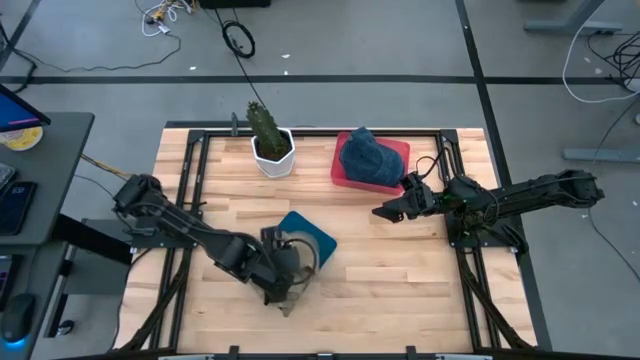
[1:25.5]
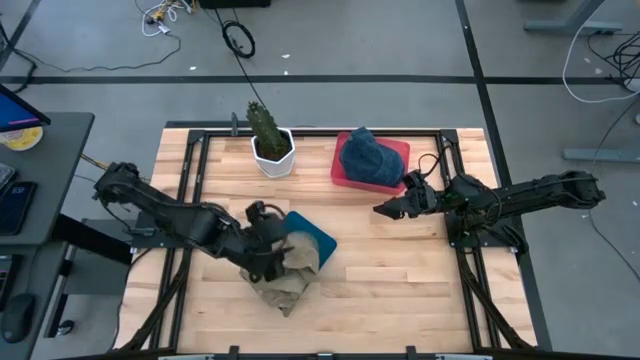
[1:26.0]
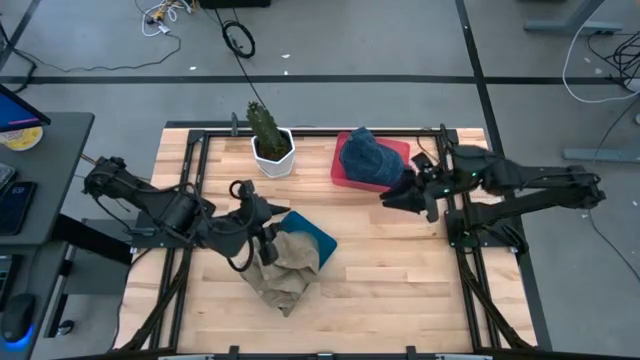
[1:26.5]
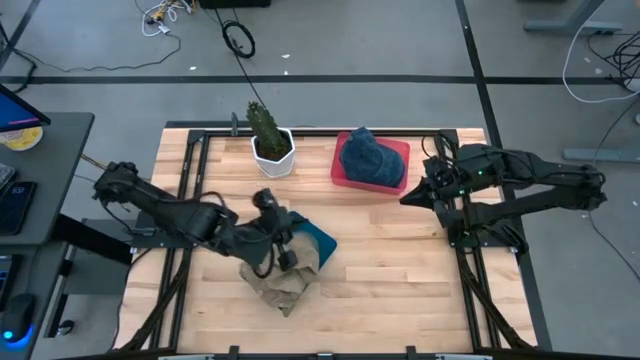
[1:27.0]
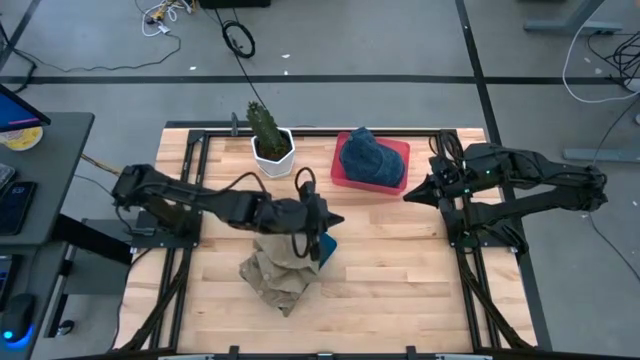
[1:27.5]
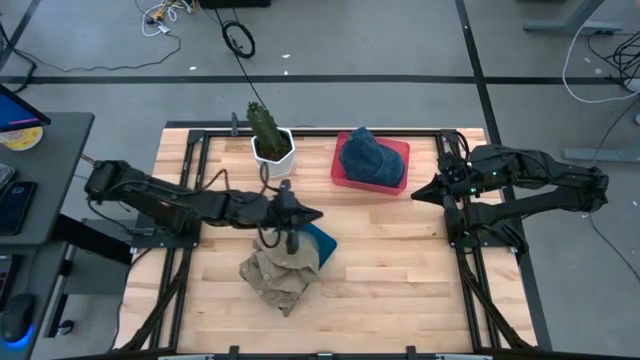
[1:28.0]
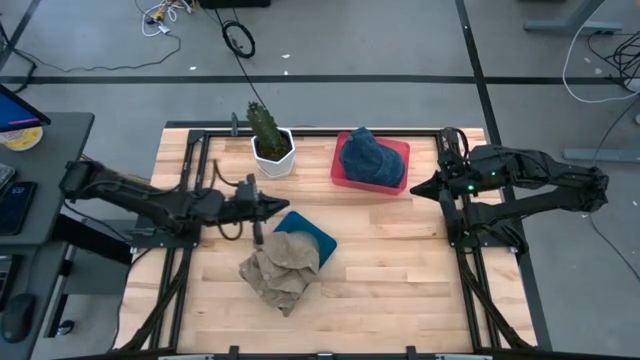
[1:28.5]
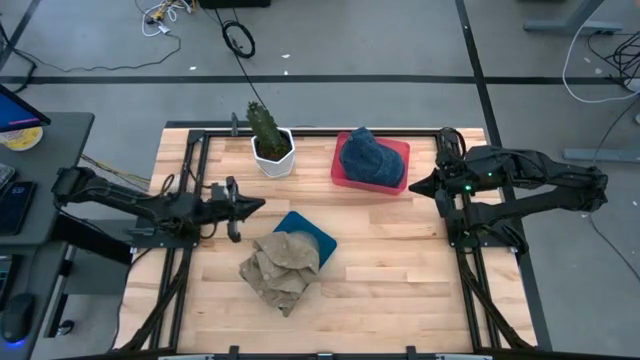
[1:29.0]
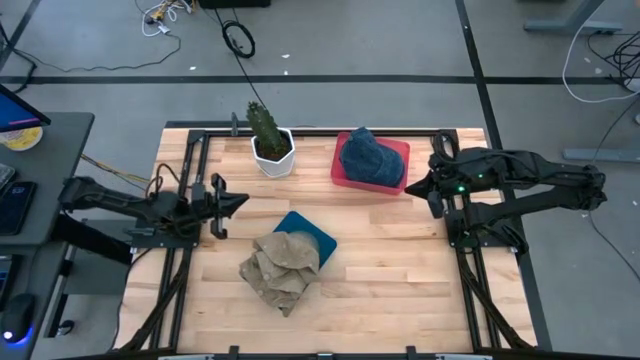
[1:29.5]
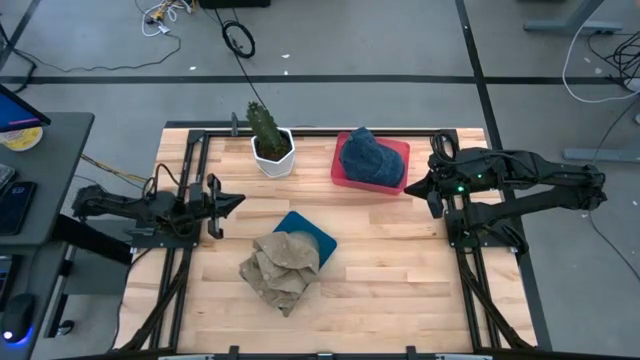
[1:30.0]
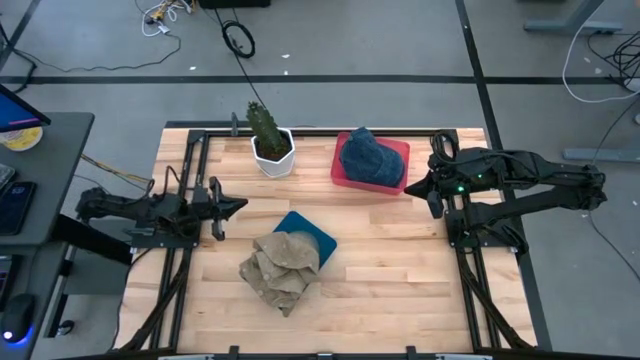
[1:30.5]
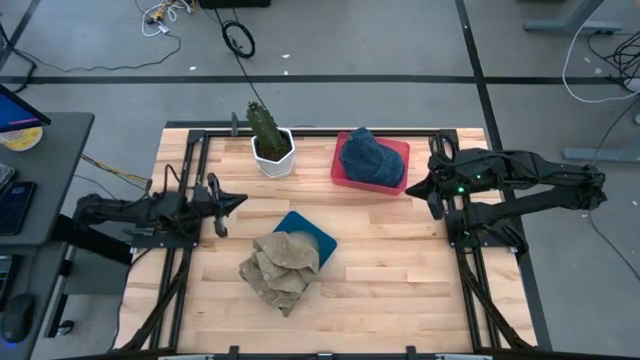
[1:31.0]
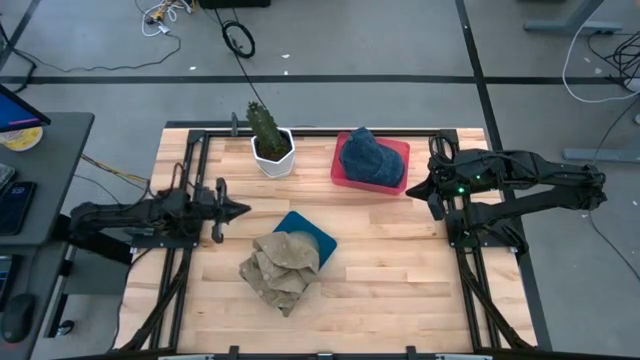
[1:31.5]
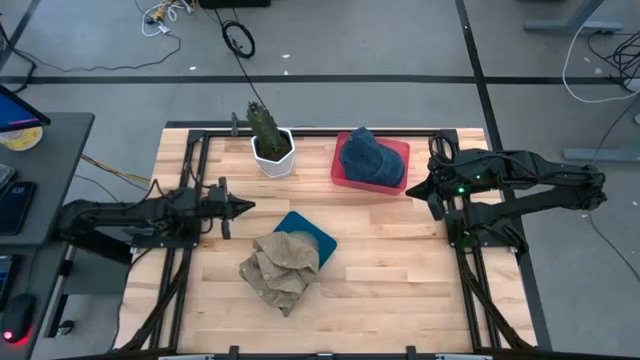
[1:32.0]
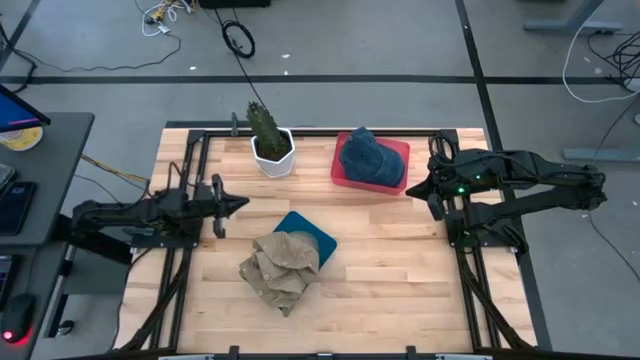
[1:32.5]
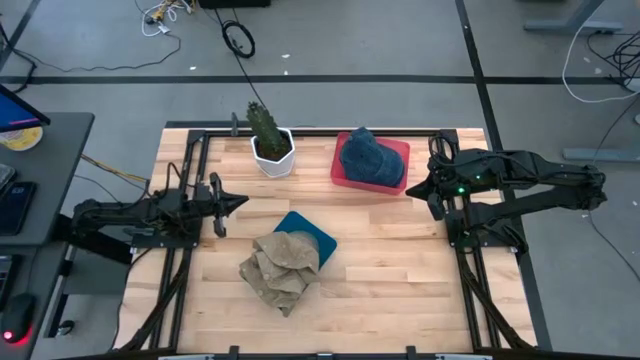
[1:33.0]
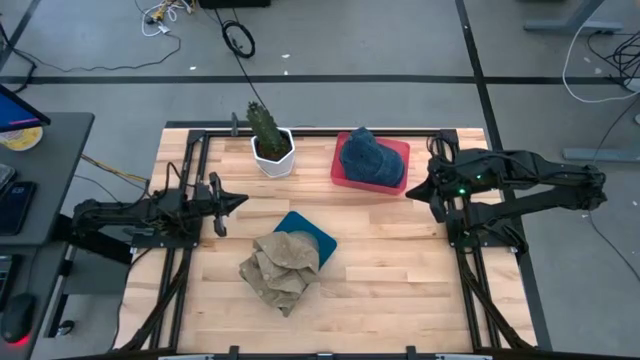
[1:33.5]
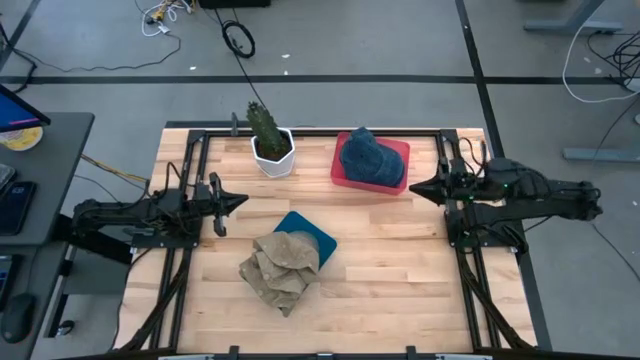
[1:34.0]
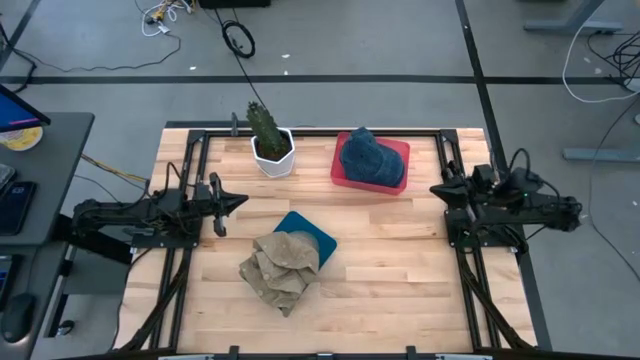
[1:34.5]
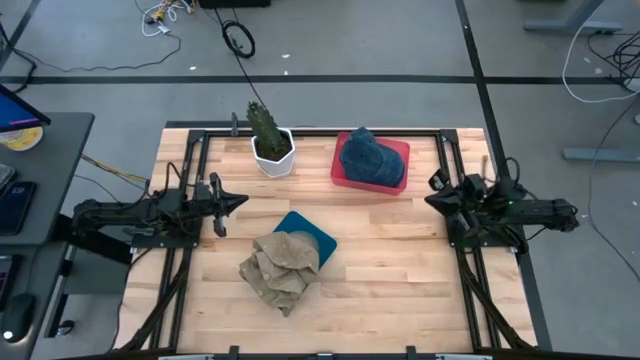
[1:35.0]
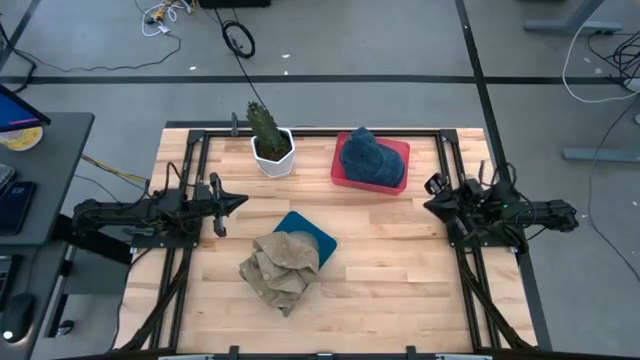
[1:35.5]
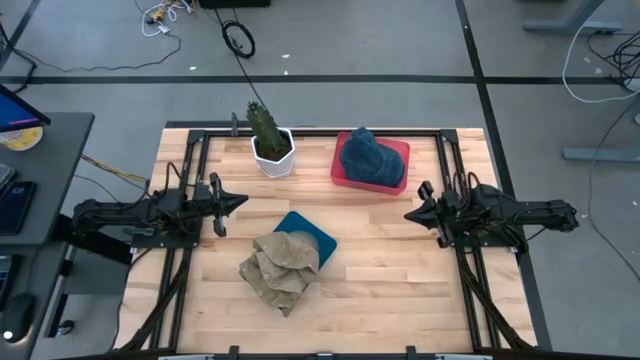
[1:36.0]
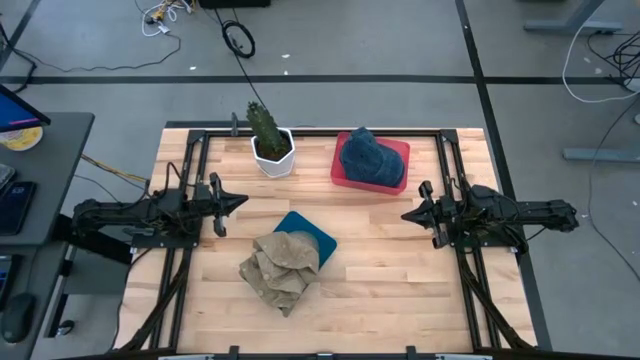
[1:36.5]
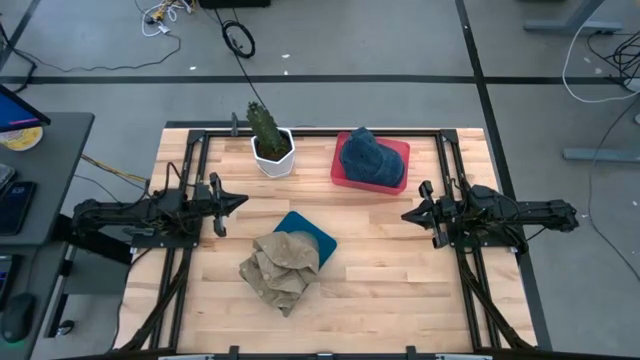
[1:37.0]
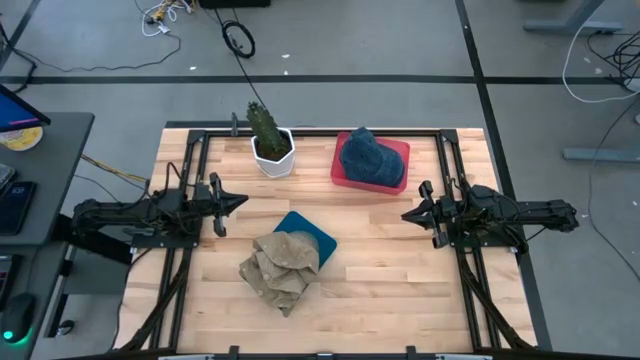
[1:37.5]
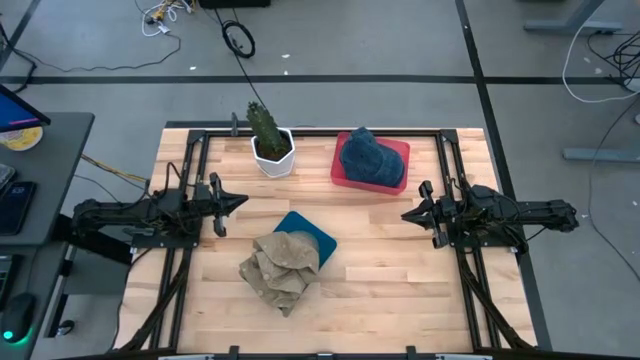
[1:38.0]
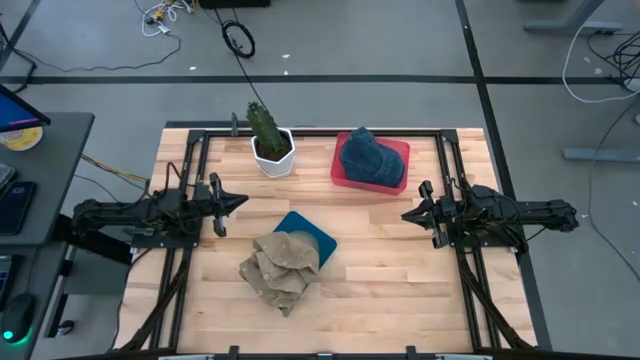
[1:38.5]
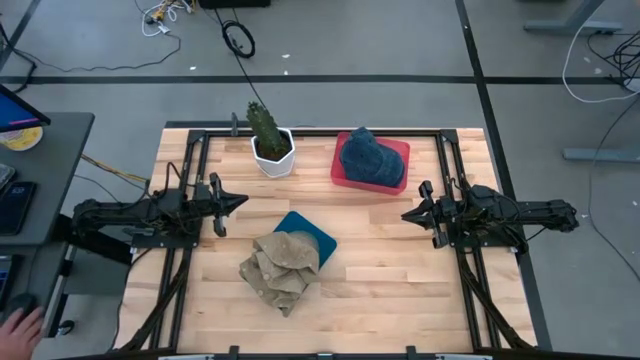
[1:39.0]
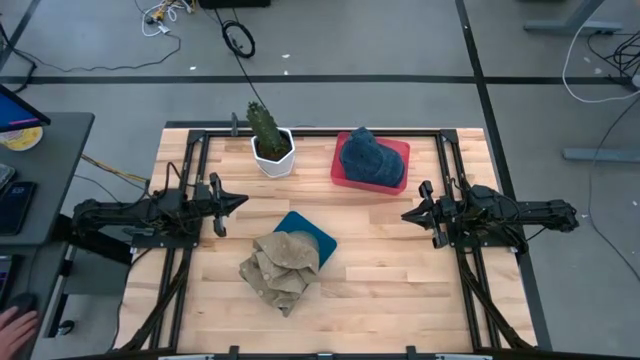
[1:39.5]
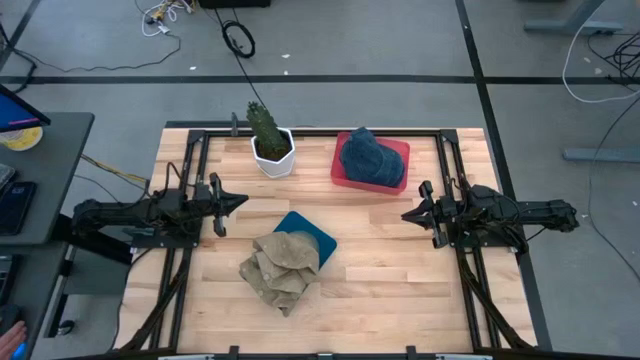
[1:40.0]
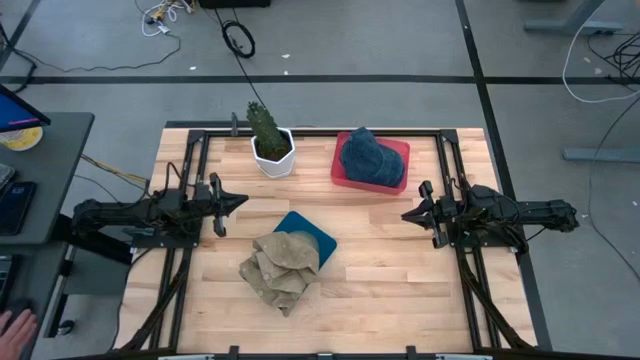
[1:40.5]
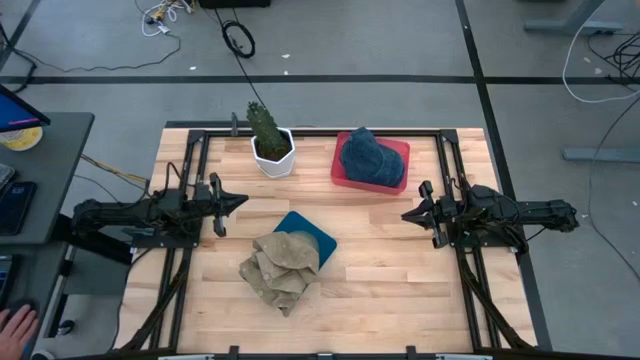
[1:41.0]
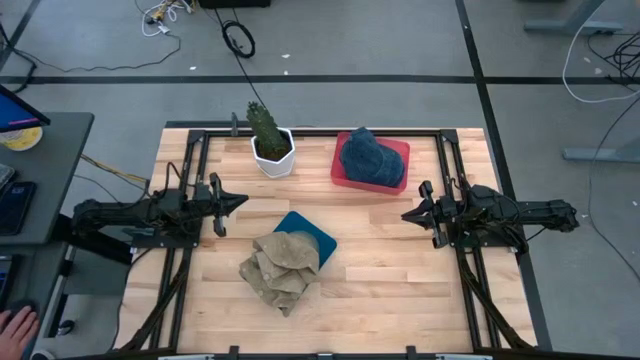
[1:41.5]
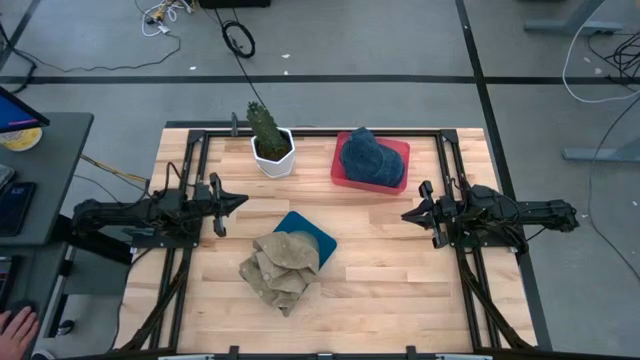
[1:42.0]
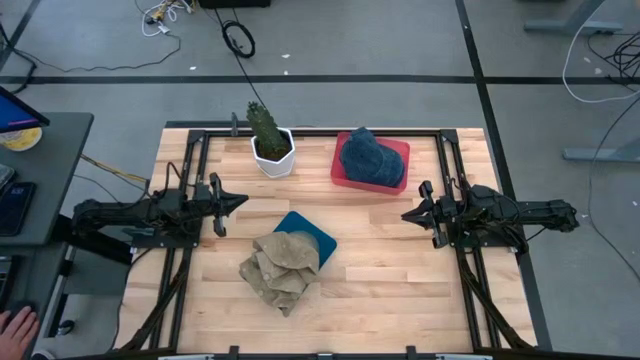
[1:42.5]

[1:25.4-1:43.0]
Task: Pick & Place hat
Return to Home Position

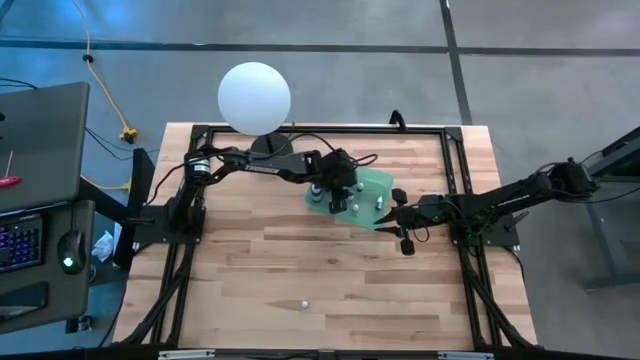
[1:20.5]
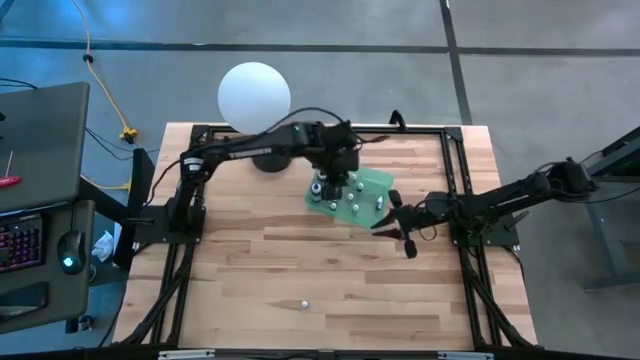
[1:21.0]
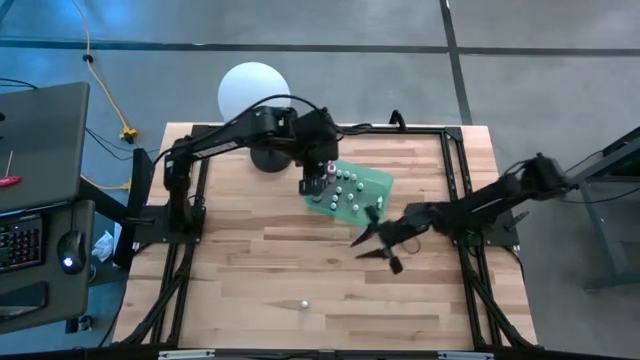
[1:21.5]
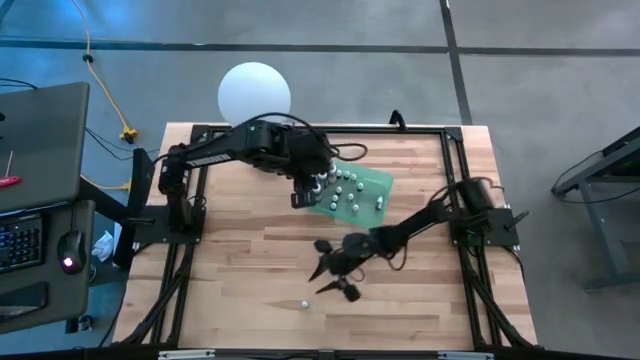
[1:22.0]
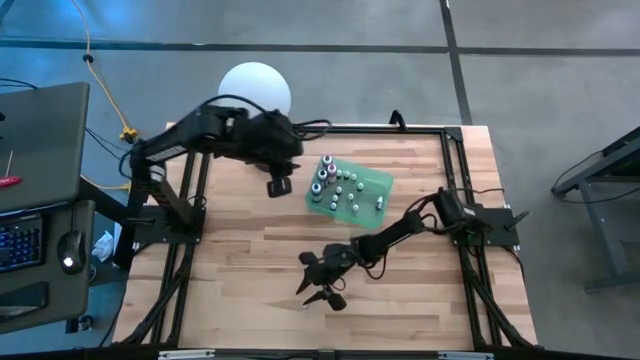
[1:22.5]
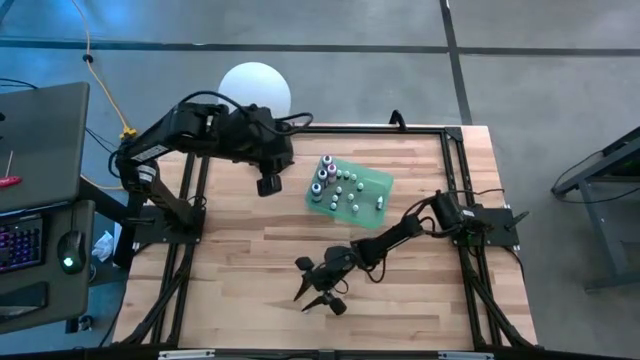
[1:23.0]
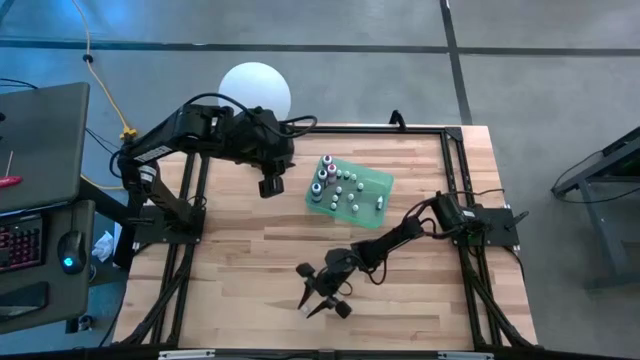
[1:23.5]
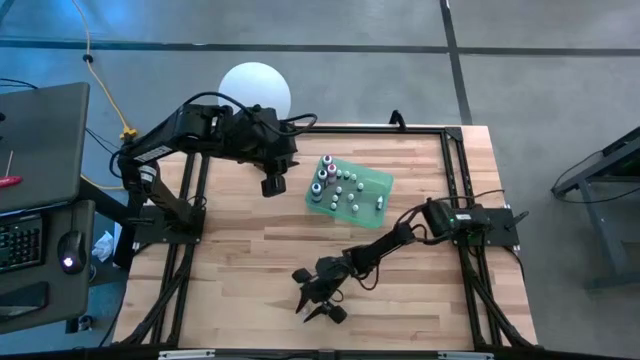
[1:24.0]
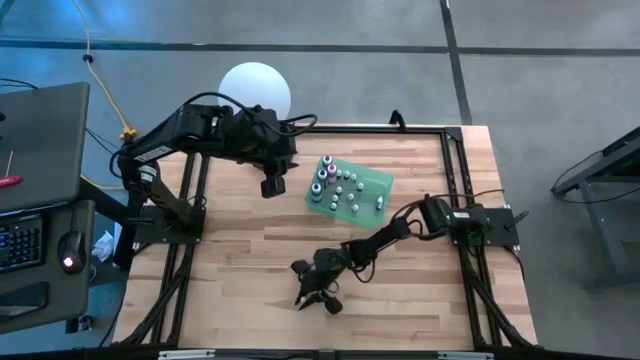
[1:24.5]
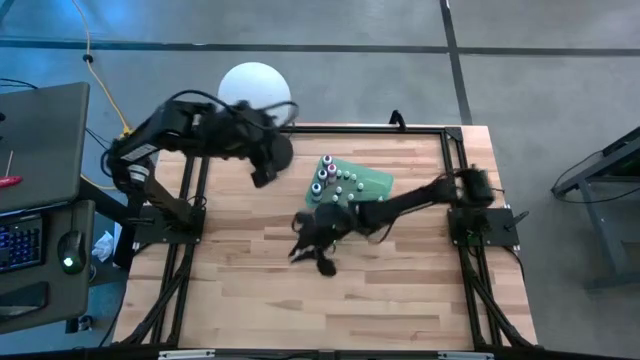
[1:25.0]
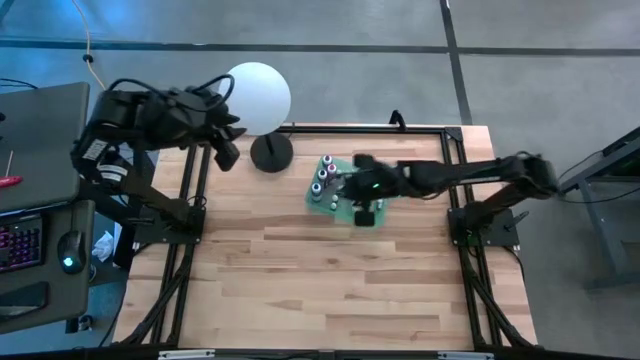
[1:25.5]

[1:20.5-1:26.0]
Task: Pick & Place food coloring
Put the small green food coloring bottle into the green container
